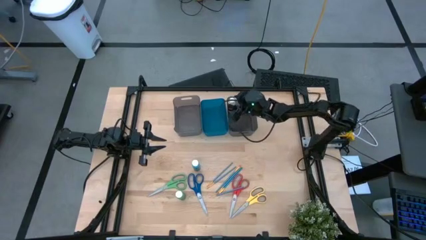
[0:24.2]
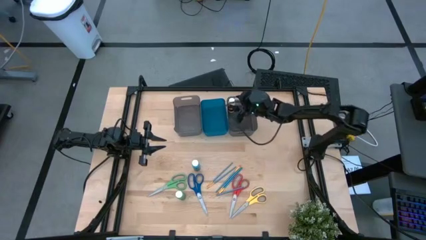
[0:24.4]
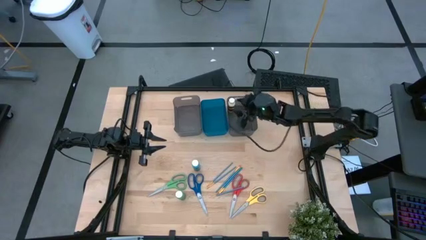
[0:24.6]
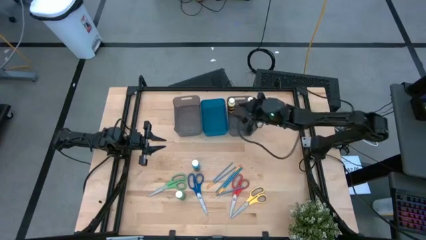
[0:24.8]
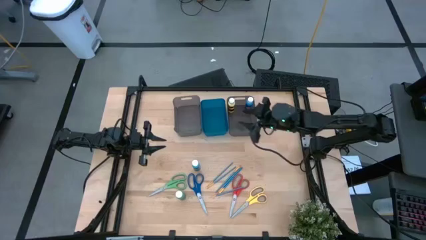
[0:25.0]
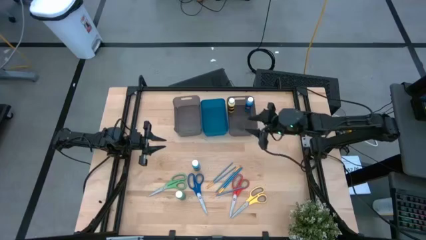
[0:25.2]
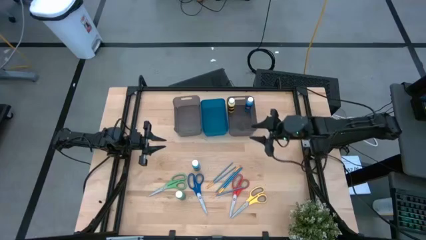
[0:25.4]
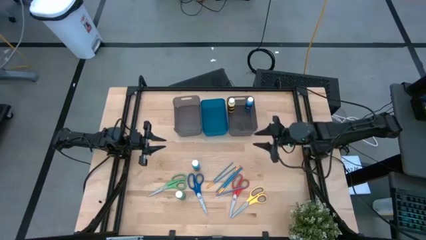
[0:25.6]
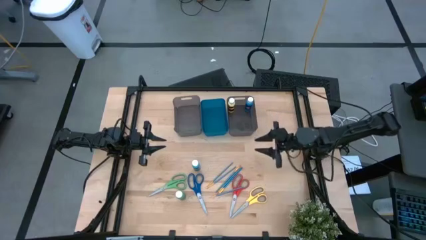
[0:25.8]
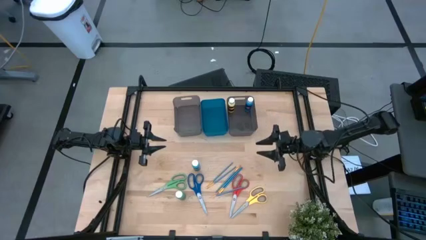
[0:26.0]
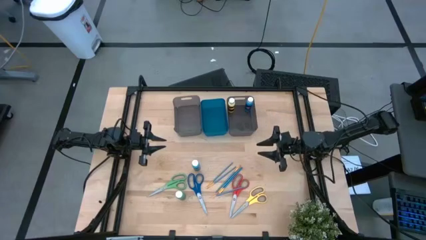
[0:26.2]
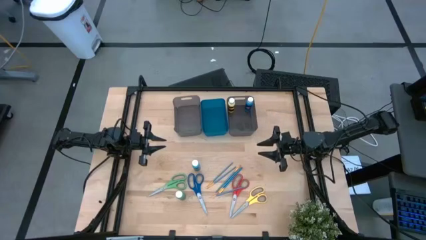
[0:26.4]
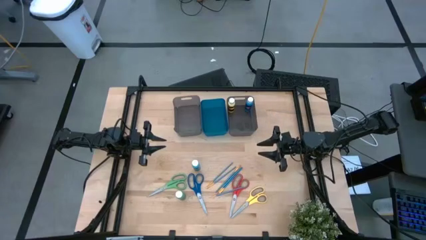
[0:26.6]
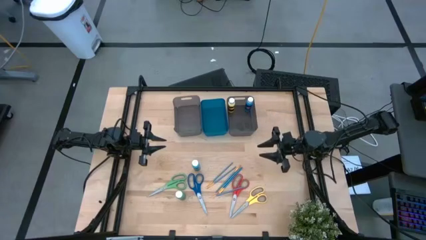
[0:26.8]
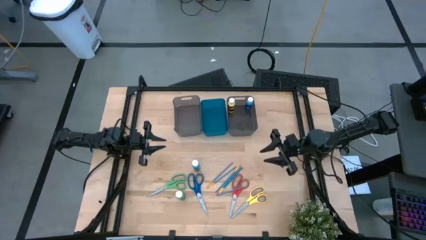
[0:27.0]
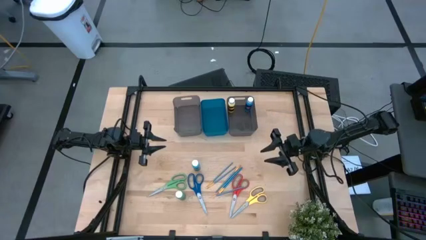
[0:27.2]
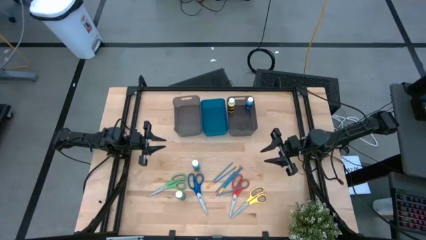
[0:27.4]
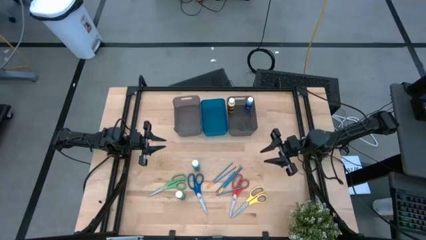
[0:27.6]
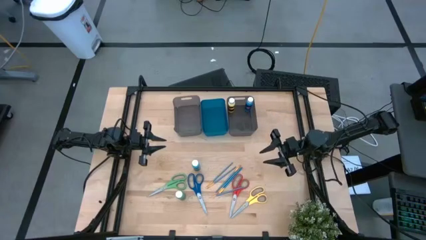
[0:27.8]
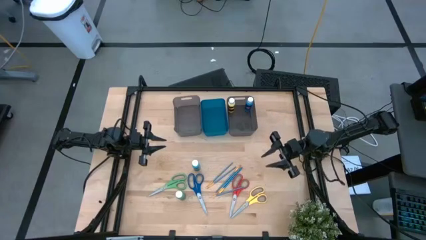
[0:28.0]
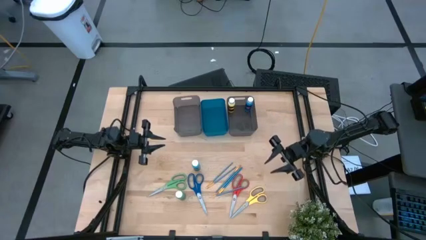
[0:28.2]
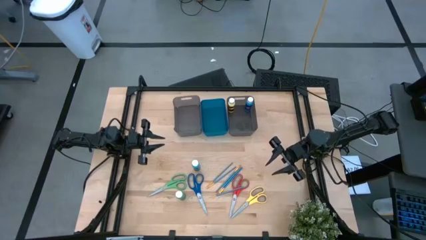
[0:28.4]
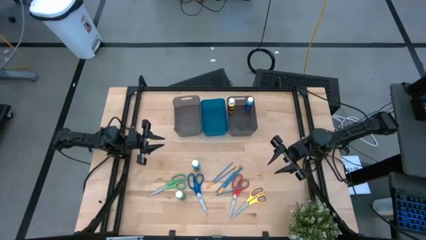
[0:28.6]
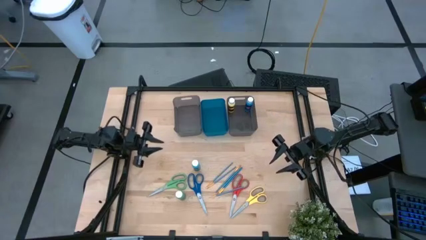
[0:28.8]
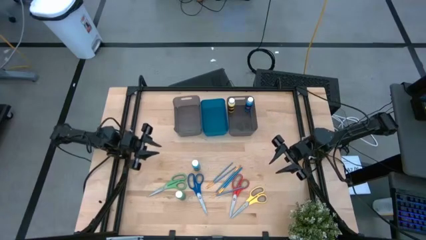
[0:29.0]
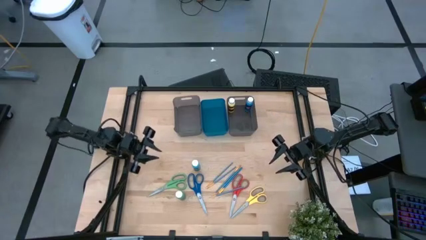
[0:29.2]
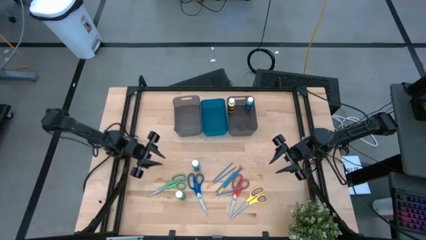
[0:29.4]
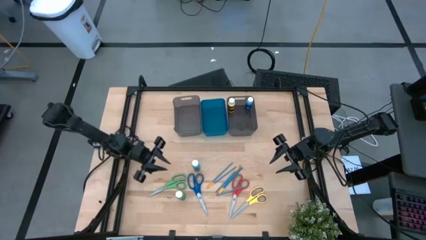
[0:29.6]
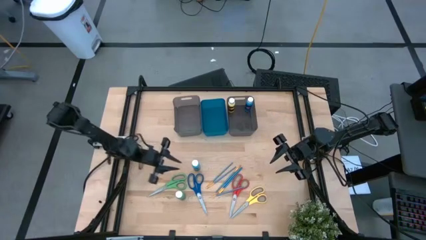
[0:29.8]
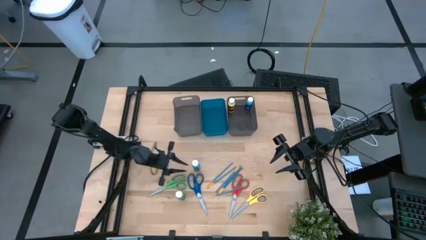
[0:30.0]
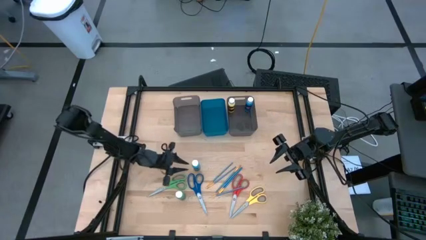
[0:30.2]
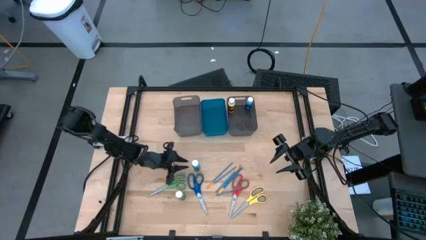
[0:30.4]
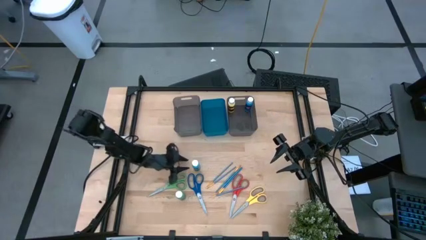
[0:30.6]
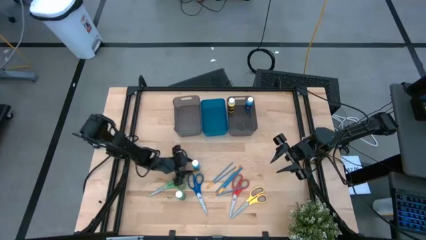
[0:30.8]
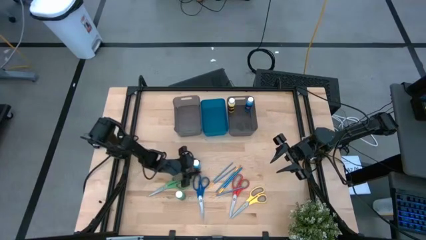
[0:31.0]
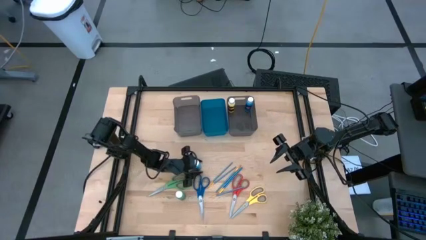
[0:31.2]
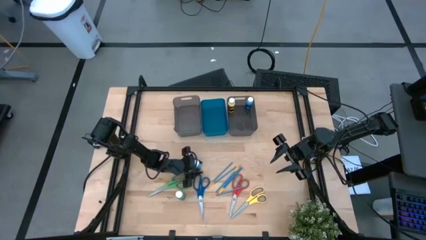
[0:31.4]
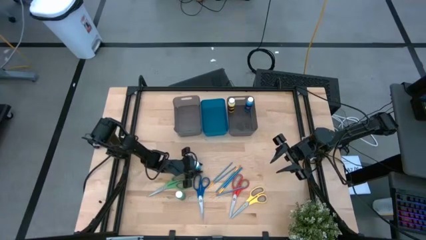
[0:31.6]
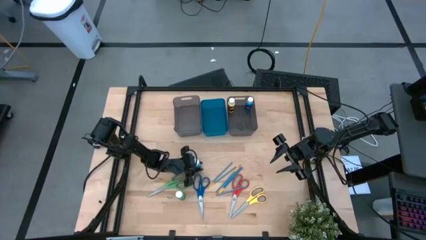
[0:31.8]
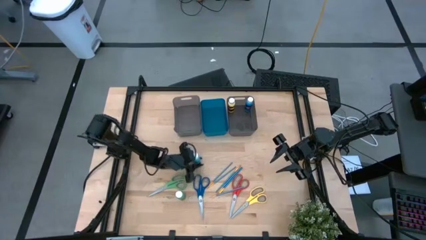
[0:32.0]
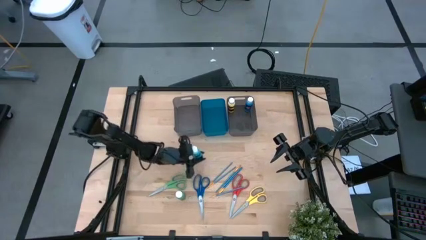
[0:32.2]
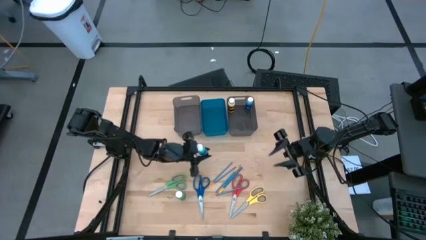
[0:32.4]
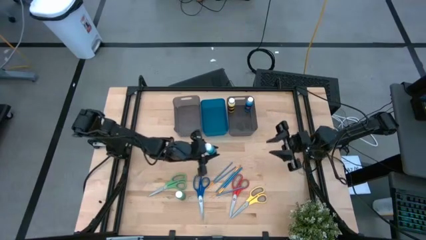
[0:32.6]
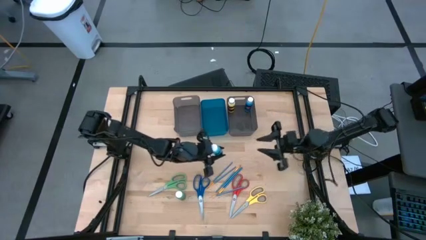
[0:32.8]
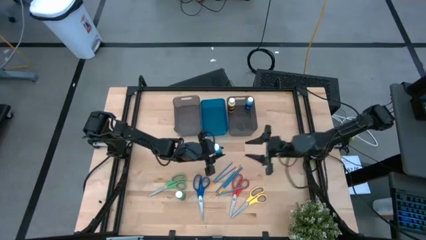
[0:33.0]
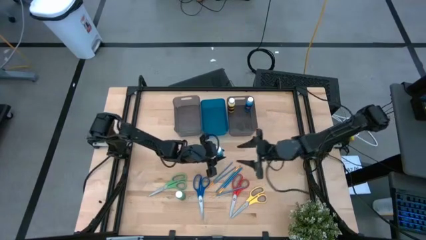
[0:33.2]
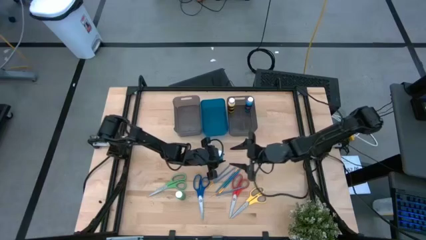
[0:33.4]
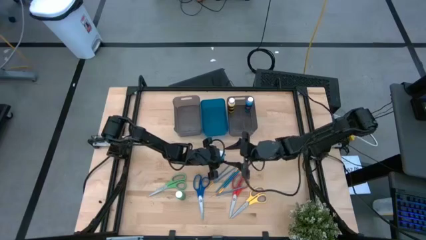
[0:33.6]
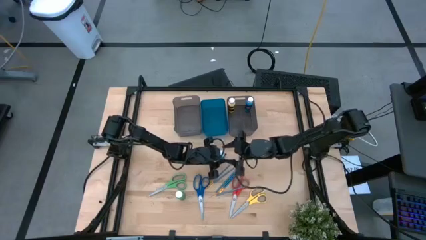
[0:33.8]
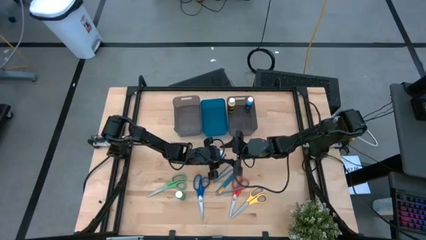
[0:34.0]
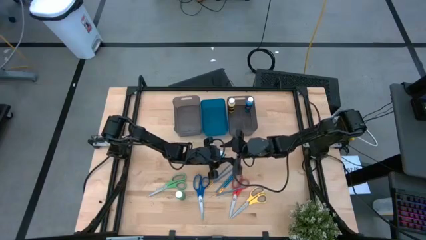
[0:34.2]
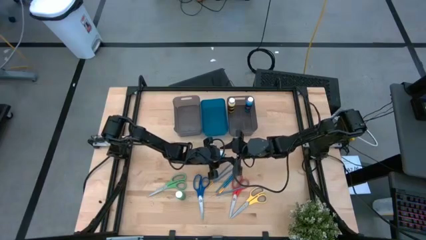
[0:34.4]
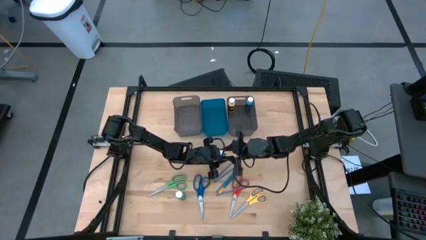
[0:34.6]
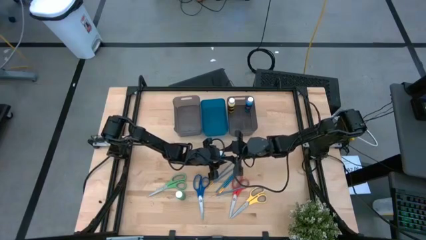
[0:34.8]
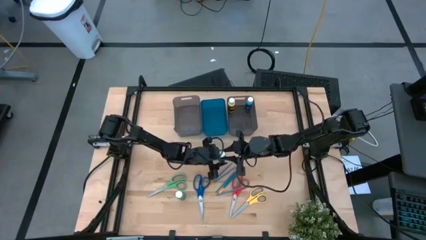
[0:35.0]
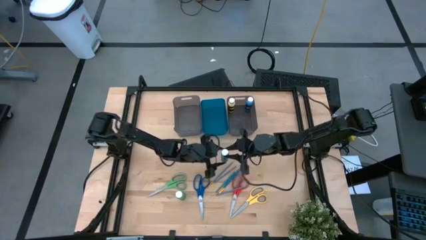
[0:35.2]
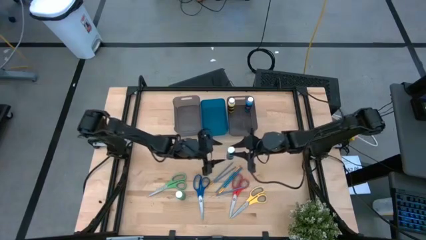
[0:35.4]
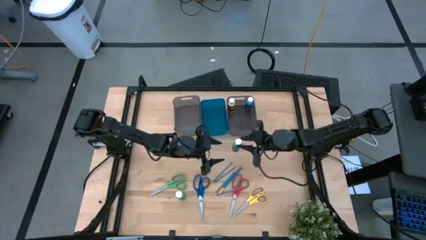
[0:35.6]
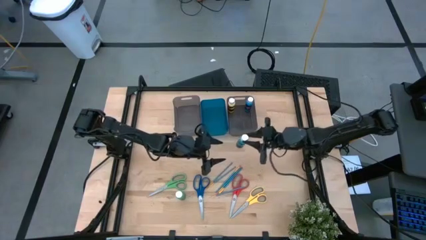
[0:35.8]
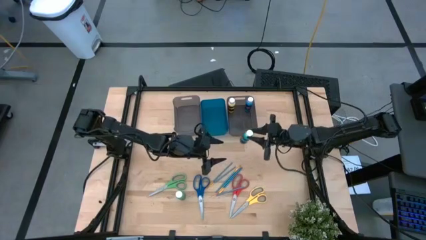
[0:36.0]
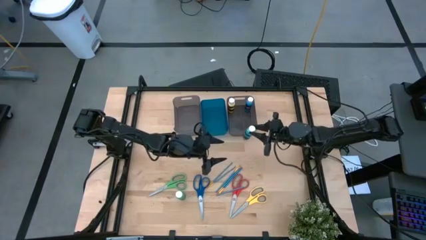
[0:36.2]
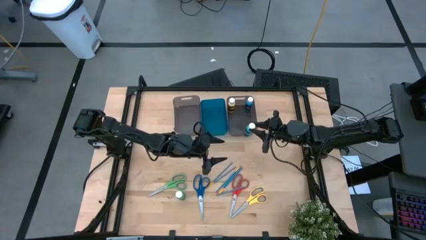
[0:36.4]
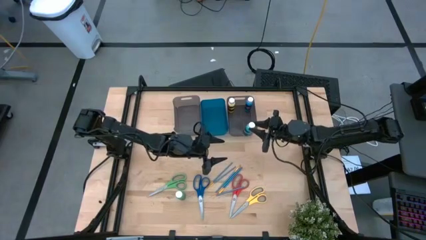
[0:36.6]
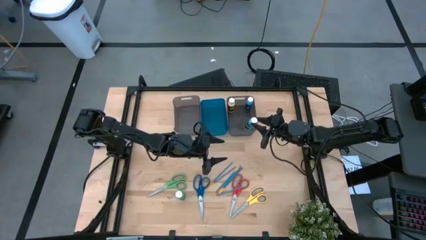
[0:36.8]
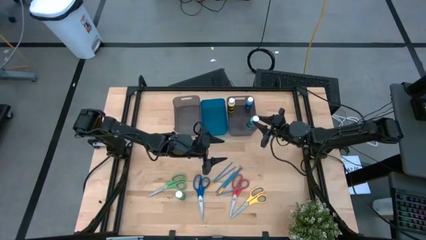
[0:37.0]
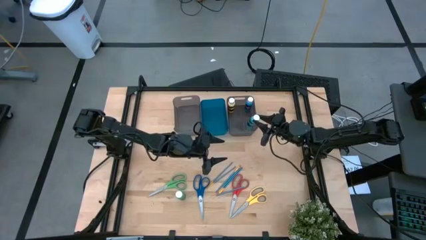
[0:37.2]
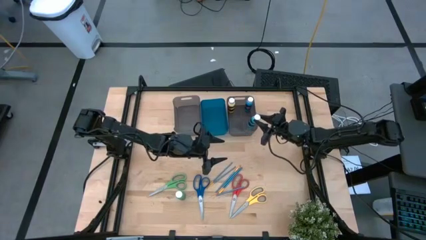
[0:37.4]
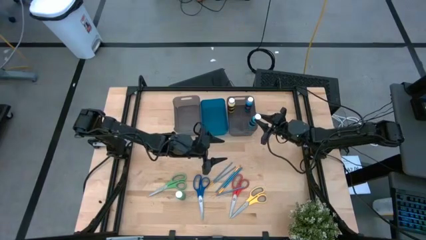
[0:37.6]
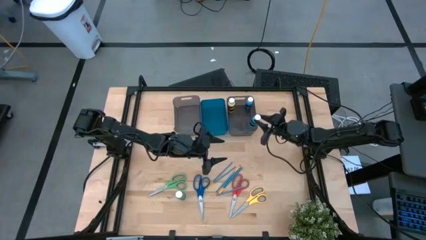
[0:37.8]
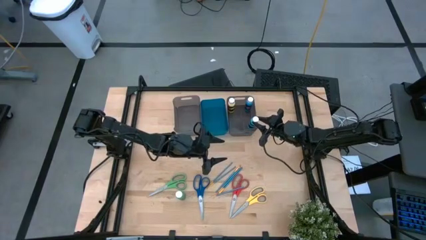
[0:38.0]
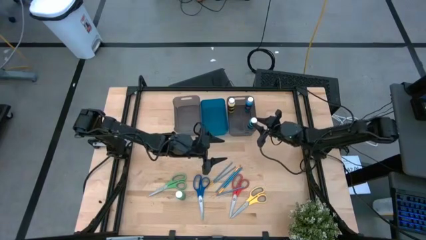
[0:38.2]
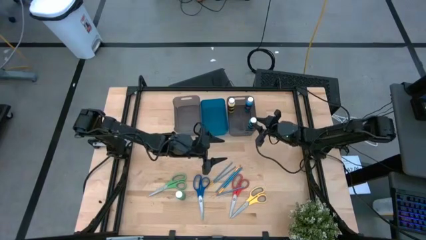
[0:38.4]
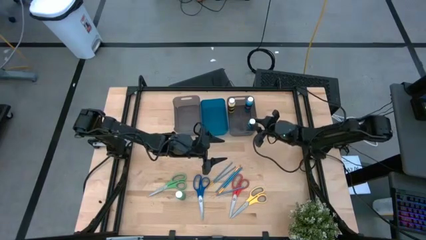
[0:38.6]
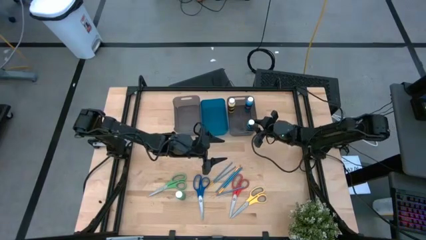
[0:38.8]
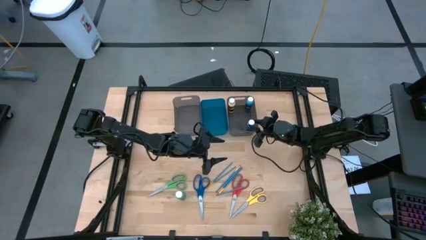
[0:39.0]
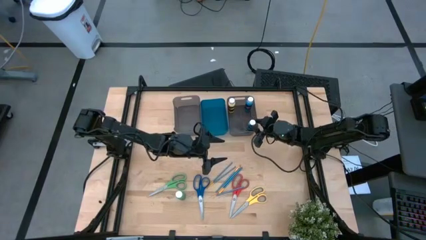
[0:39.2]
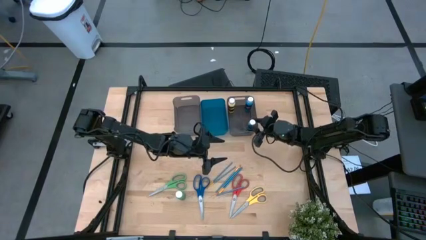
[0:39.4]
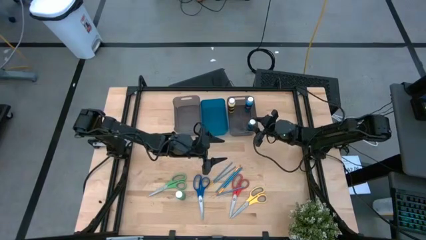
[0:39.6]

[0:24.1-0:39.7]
Task: Pick & Place Paint Supplies
Put the light blue coloring bottle into the right gray bin

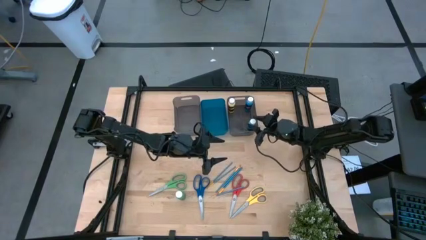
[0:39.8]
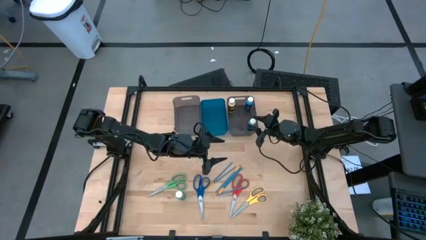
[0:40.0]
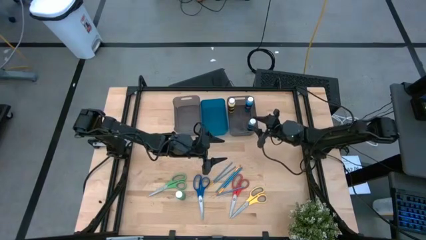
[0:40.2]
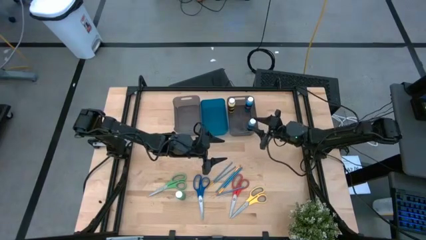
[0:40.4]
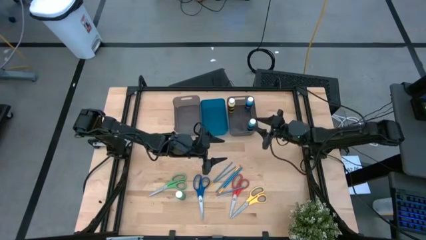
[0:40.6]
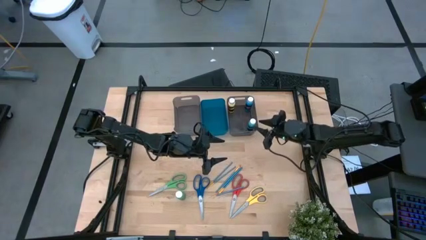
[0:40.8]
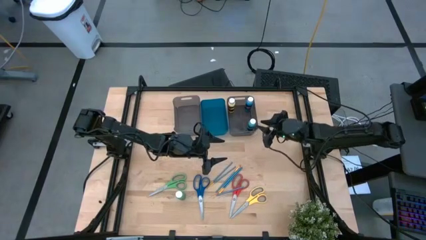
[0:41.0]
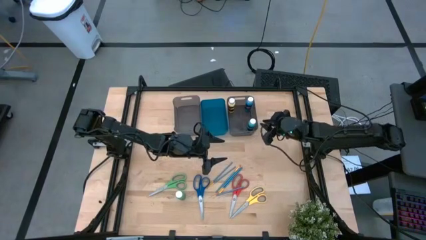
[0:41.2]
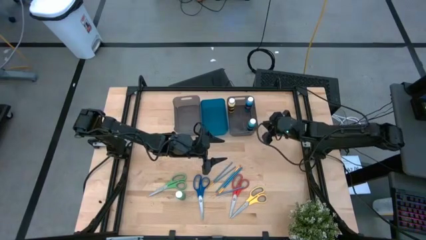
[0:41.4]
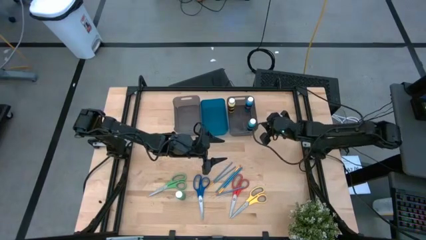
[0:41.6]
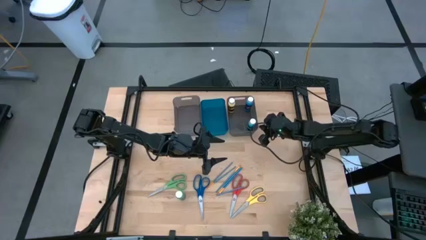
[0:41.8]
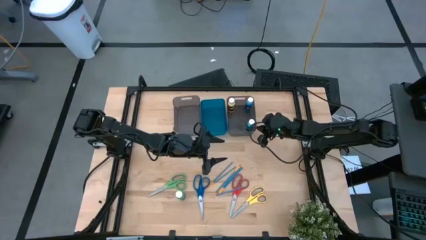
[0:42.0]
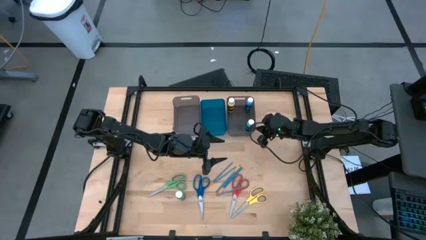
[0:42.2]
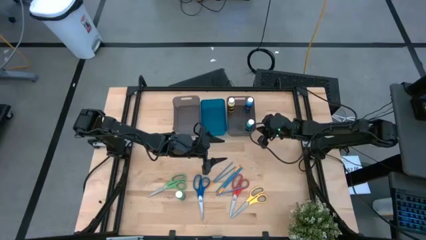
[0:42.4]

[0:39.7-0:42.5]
Adjust the right gray bin slightly on the table
